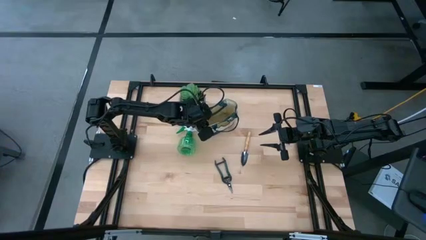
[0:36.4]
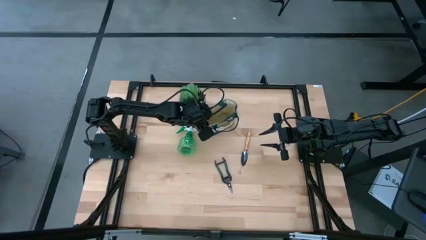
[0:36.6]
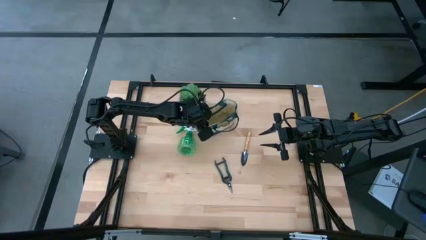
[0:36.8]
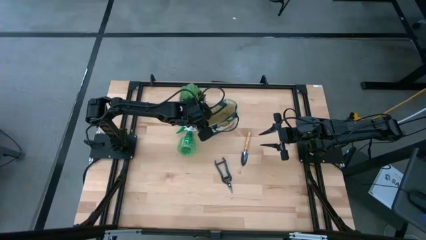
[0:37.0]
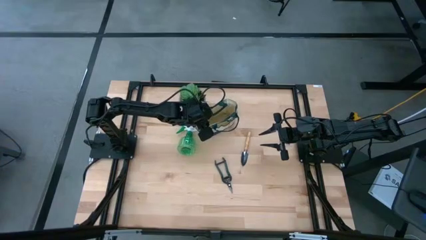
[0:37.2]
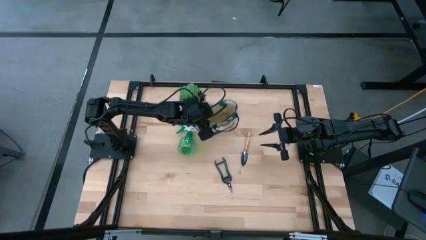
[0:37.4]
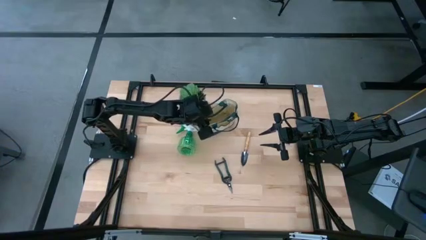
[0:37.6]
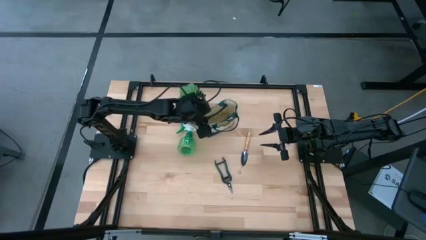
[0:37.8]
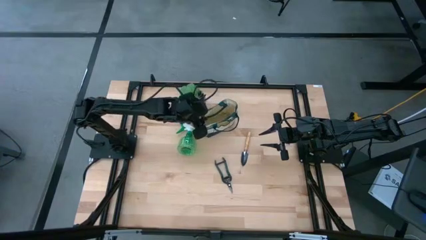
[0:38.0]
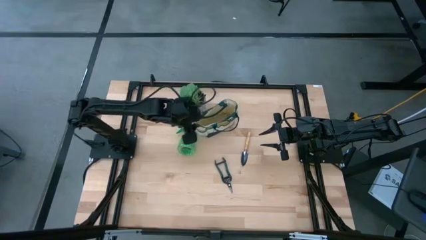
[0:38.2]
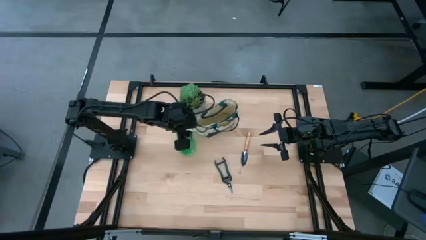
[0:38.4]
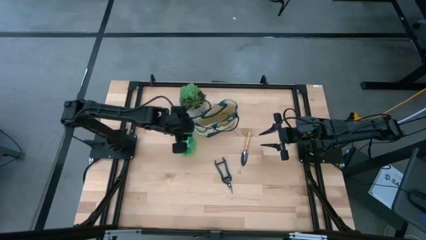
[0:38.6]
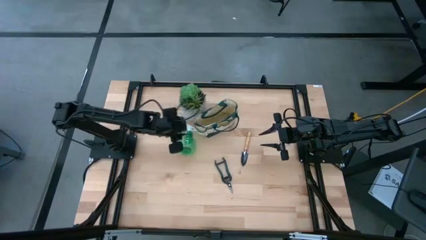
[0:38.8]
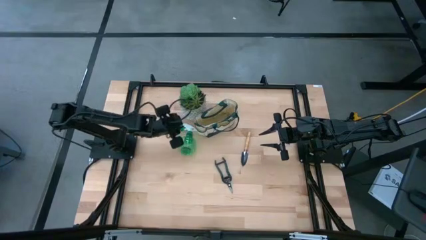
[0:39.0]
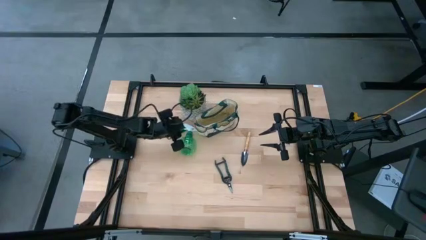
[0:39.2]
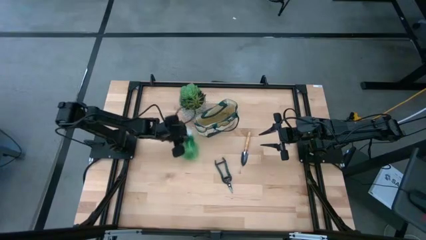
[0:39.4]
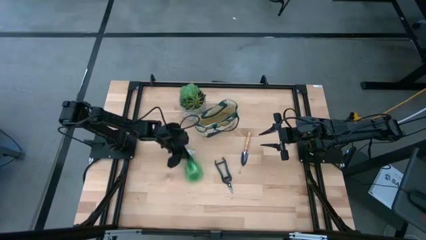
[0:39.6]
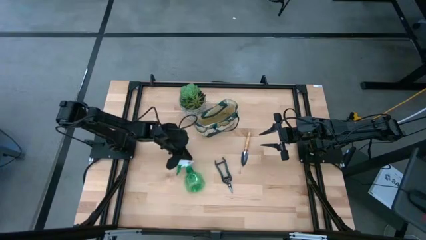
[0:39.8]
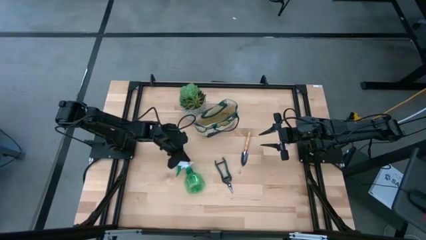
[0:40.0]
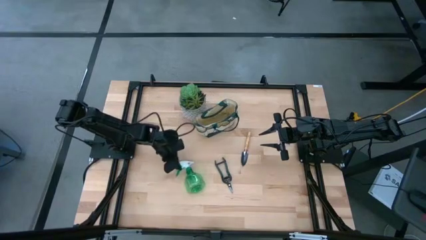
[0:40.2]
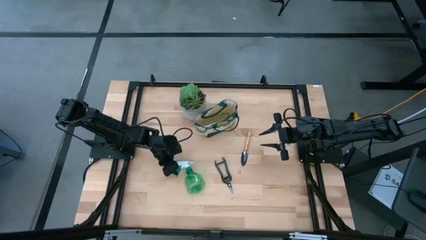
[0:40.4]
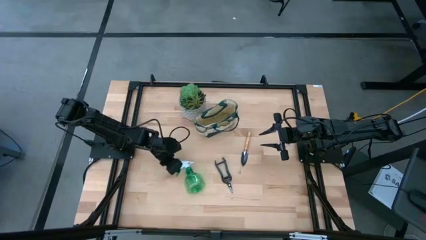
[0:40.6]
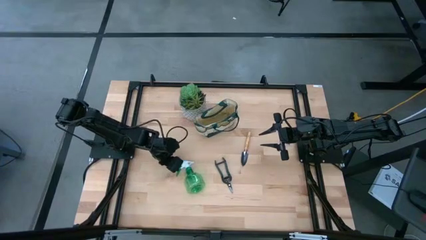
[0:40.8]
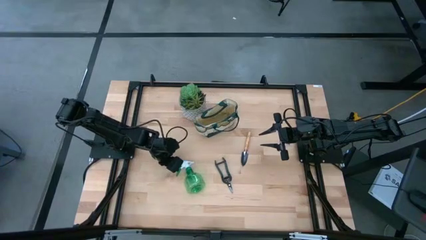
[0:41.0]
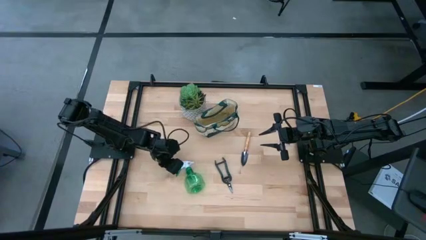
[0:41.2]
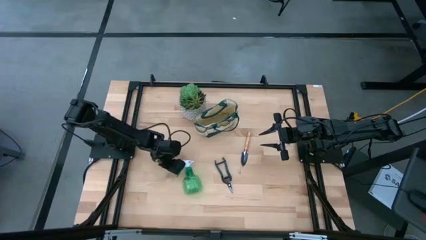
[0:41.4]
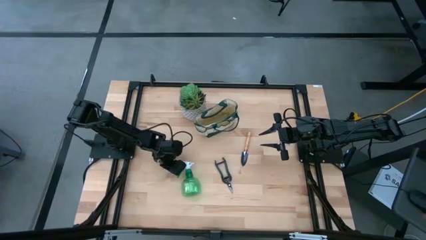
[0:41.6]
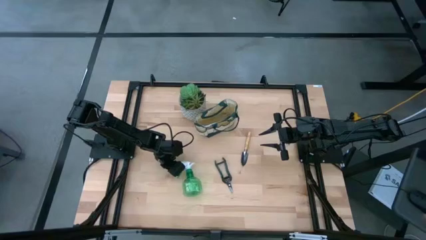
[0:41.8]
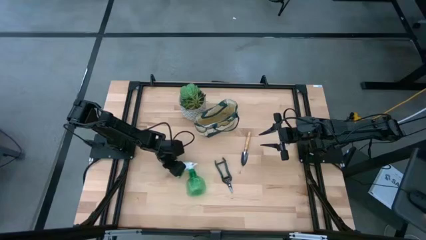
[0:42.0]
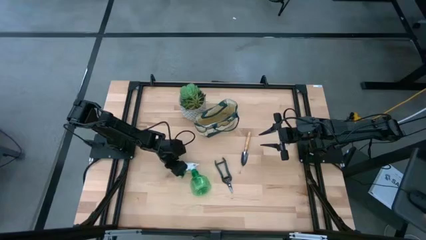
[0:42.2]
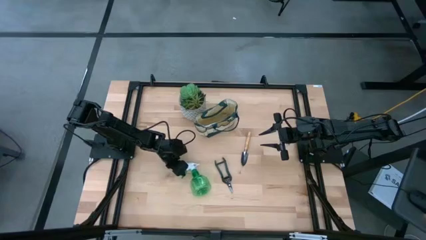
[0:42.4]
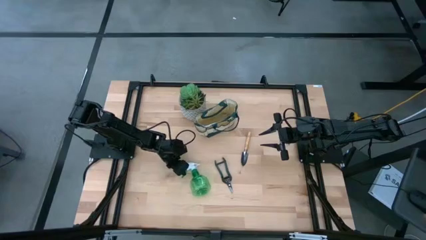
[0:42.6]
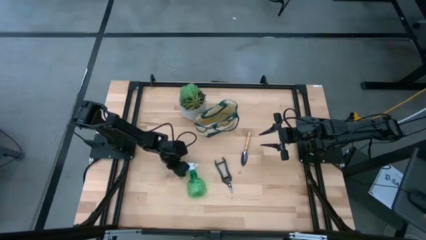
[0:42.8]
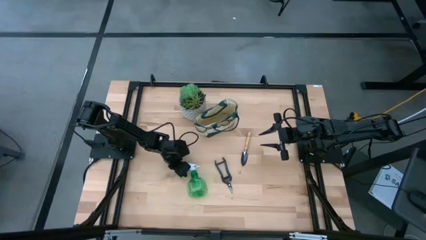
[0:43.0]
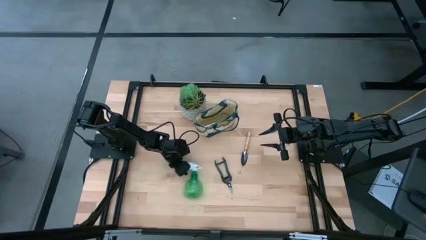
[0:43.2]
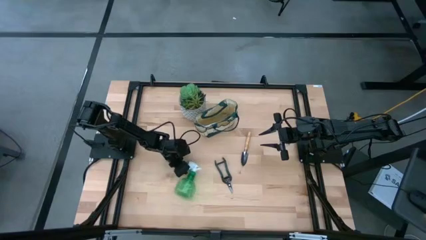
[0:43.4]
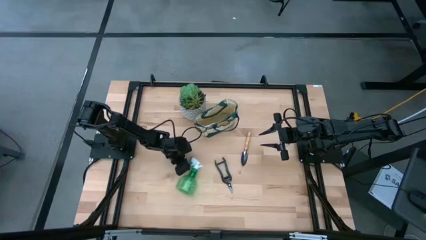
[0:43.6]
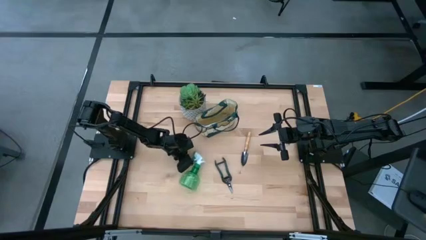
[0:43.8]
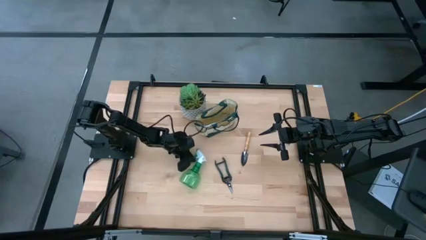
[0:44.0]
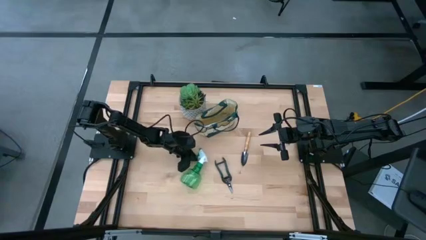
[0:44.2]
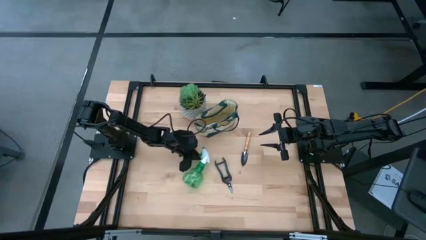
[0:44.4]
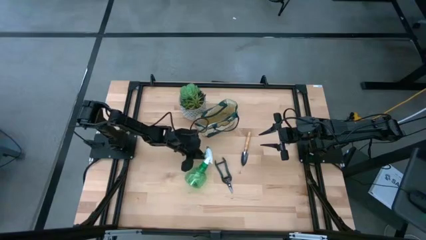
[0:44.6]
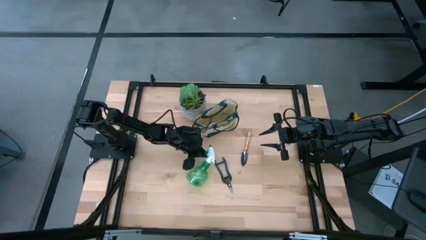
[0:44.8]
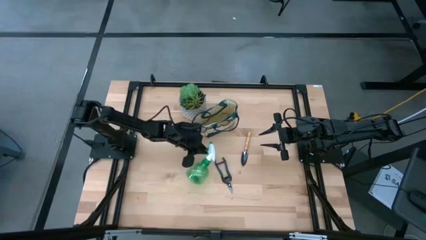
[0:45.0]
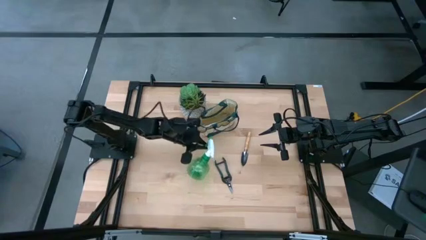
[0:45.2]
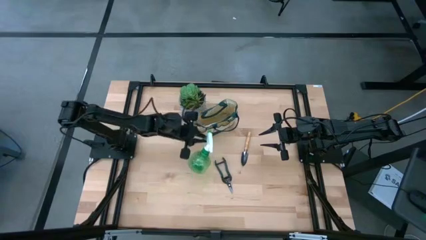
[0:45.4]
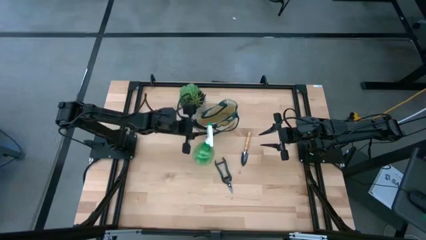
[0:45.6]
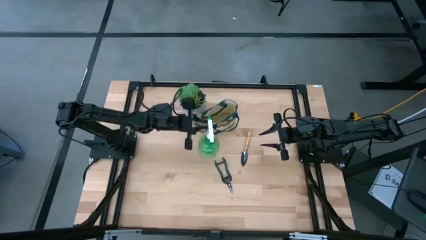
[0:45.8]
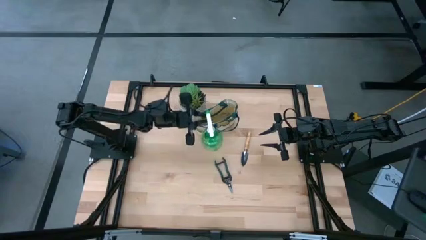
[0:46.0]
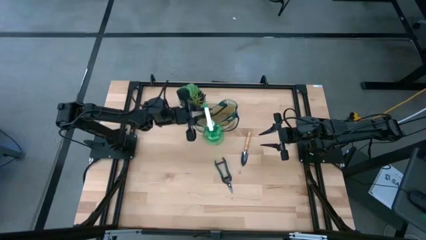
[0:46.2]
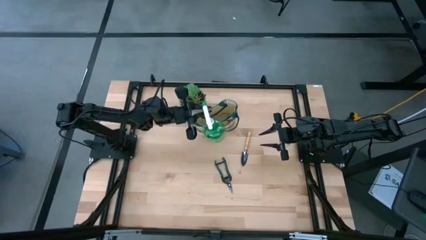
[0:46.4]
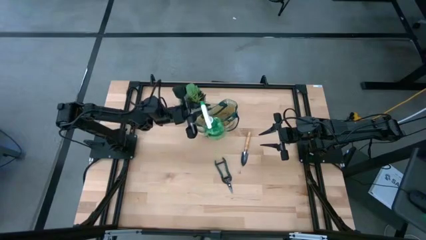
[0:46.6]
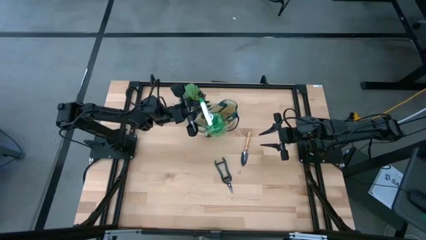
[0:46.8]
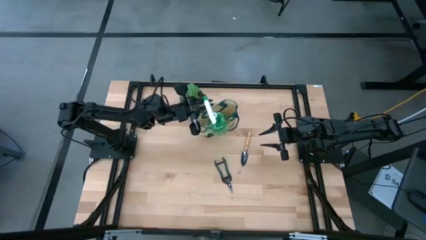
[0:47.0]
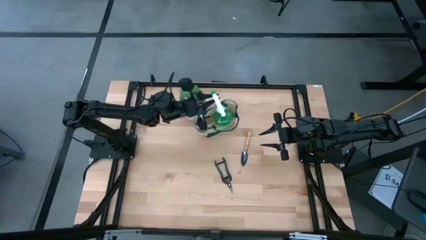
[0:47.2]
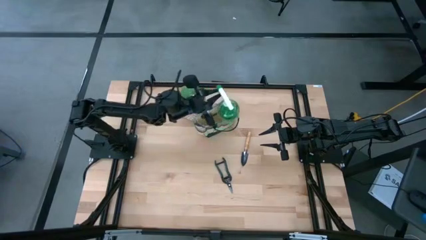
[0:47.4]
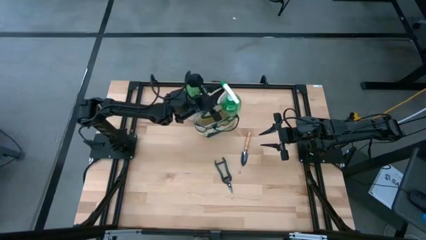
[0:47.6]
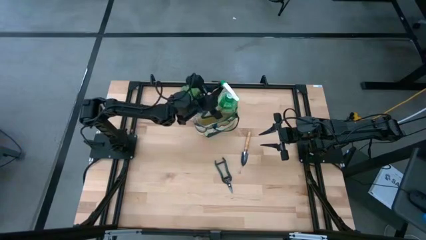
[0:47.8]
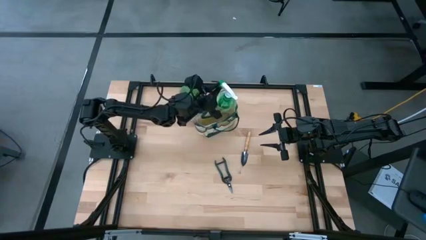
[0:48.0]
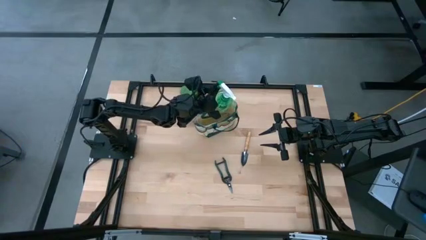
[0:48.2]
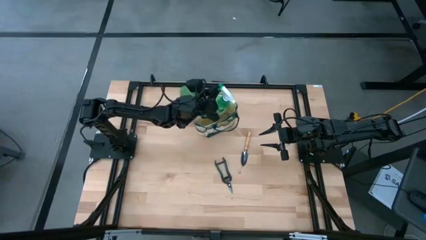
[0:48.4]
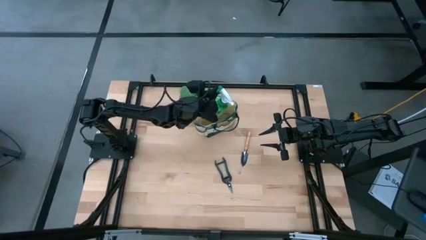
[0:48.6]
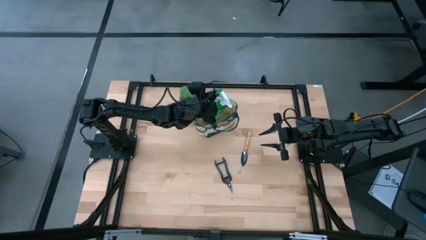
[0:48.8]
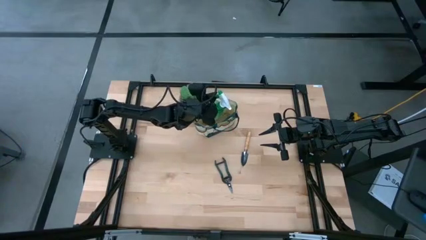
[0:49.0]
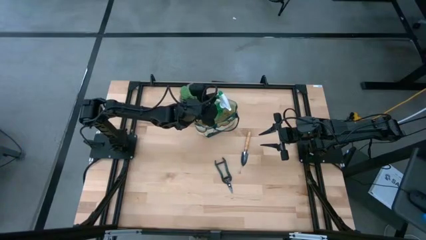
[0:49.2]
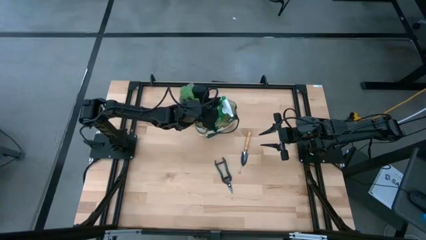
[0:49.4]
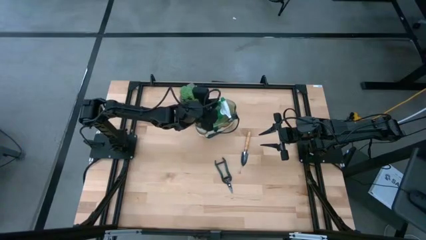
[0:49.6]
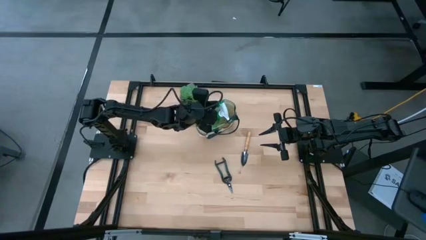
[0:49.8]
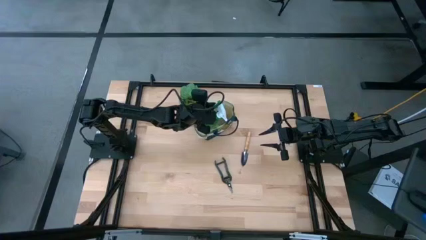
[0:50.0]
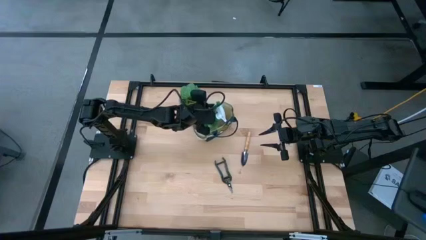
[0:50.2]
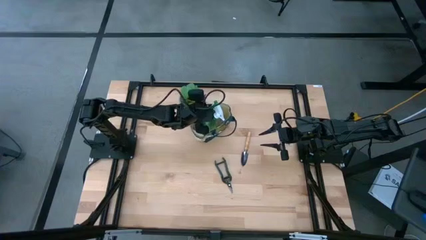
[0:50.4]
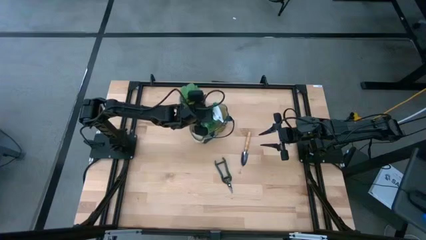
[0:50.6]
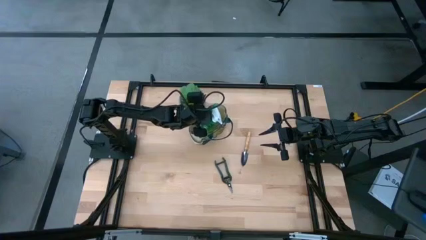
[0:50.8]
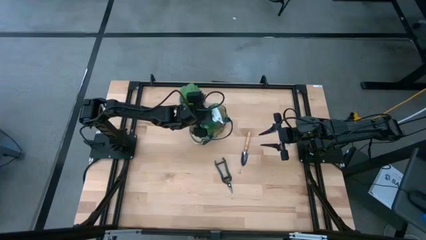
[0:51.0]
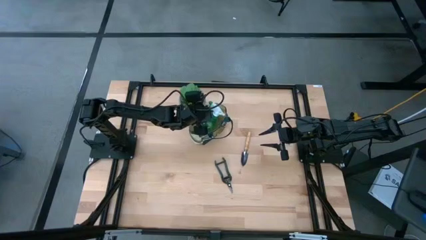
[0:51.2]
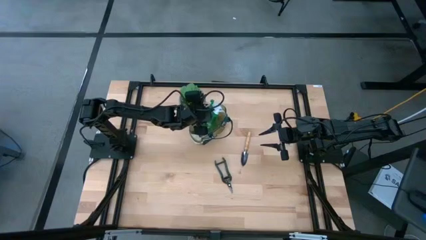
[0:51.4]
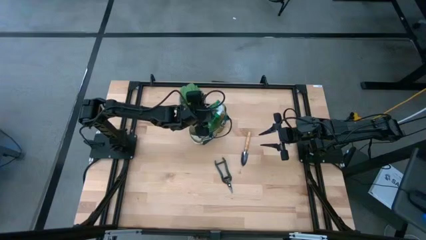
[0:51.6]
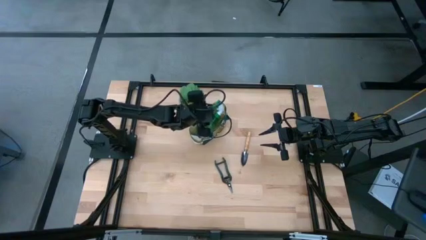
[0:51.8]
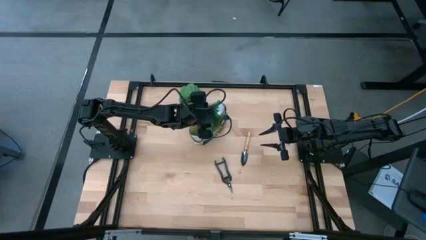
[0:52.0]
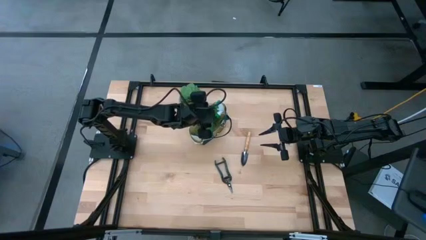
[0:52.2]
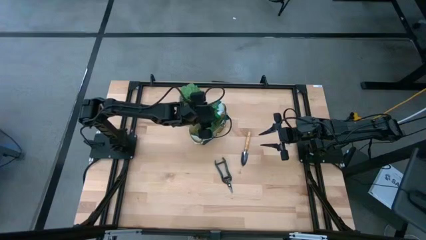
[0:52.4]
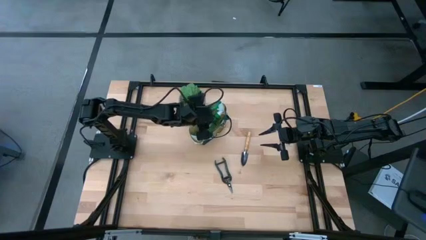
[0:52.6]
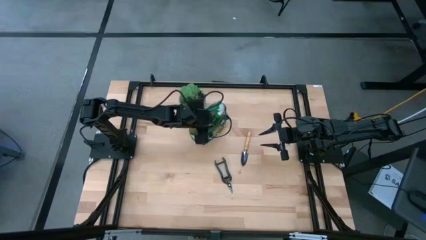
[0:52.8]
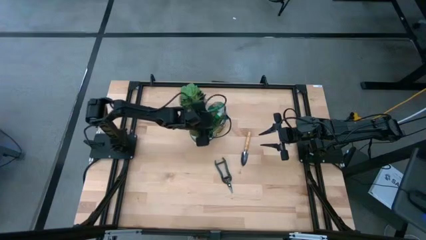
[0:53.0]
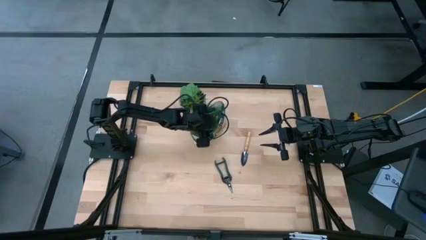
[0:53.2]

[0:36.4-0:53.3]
Task: Pick & Place Garden tools in Gardening bag
Put the green spray bottle into the white gardening bag
